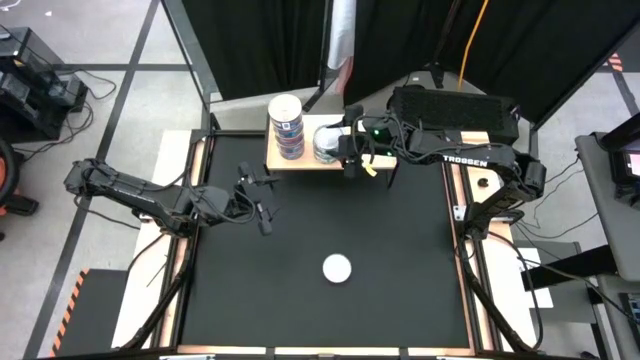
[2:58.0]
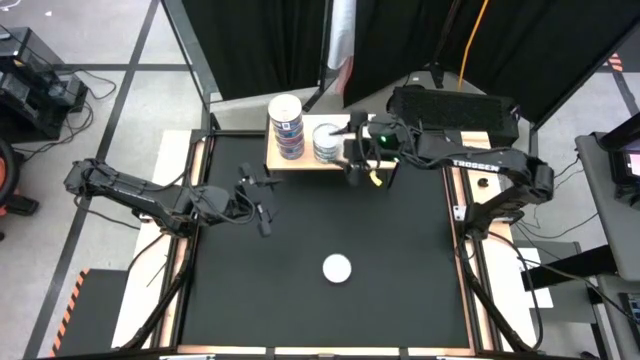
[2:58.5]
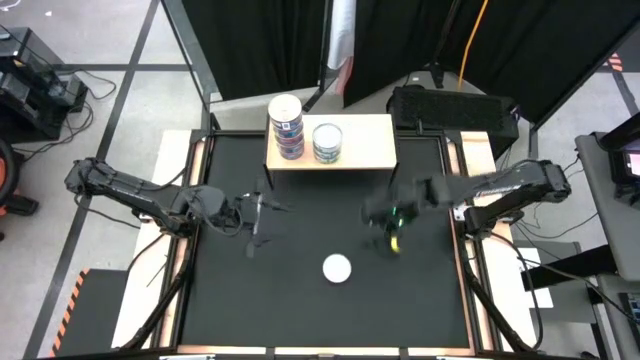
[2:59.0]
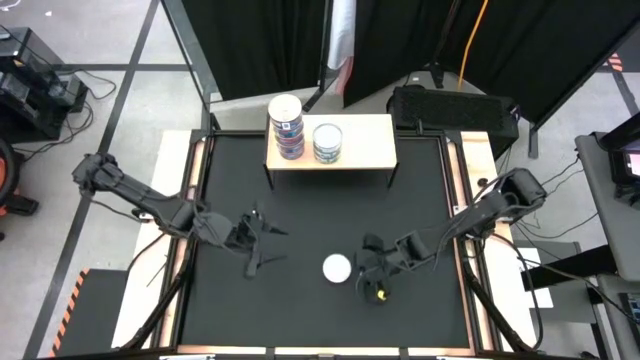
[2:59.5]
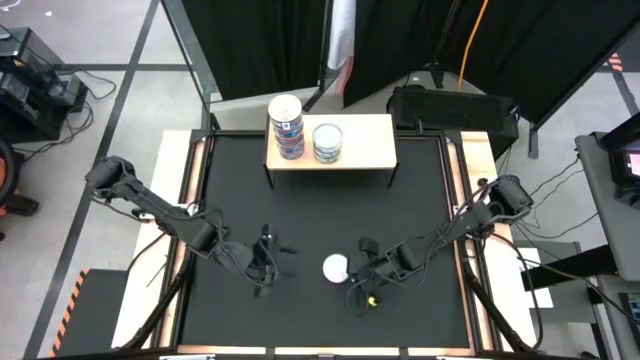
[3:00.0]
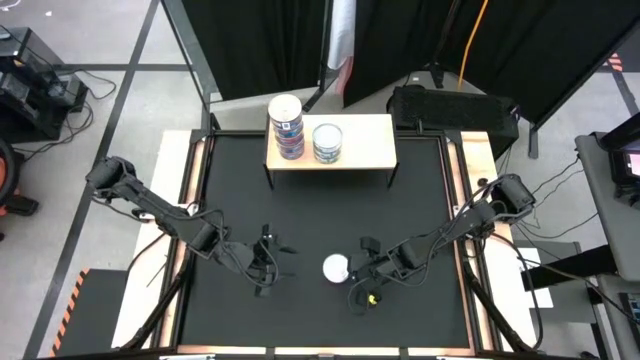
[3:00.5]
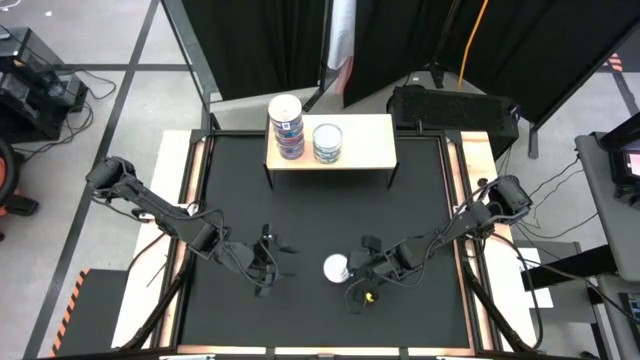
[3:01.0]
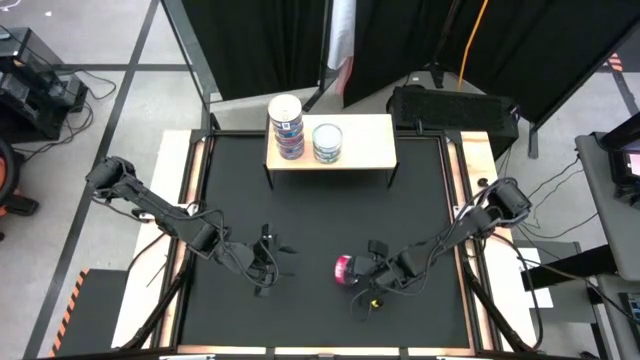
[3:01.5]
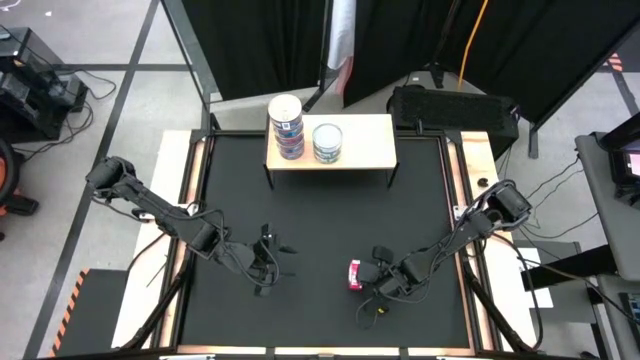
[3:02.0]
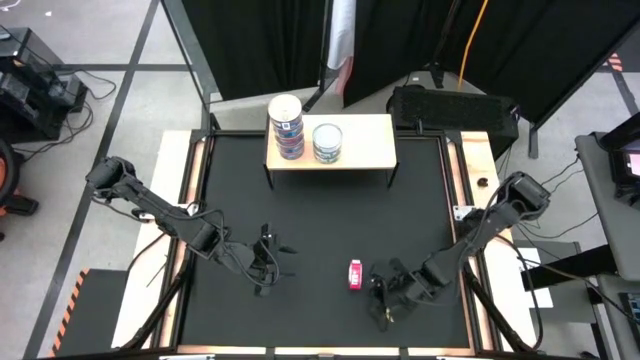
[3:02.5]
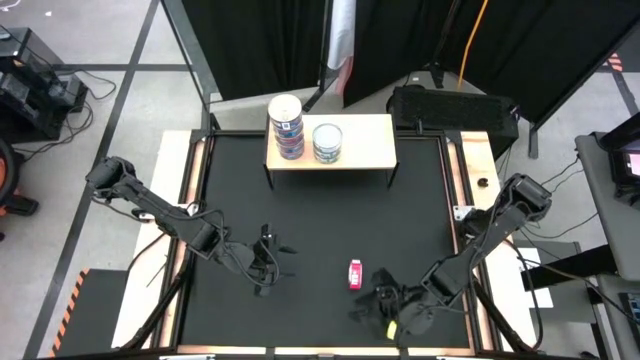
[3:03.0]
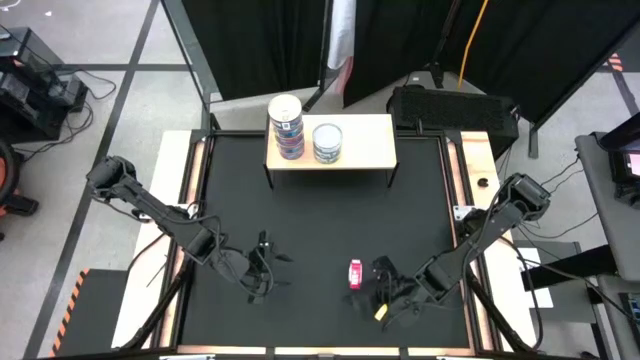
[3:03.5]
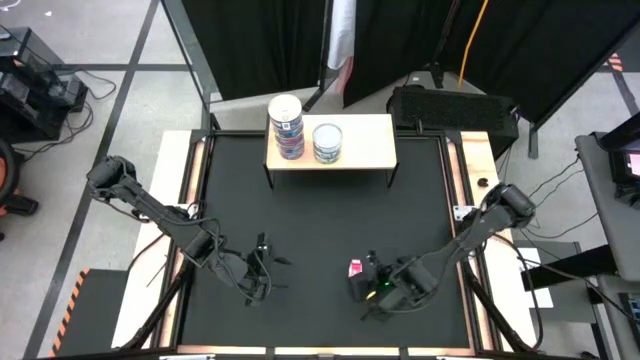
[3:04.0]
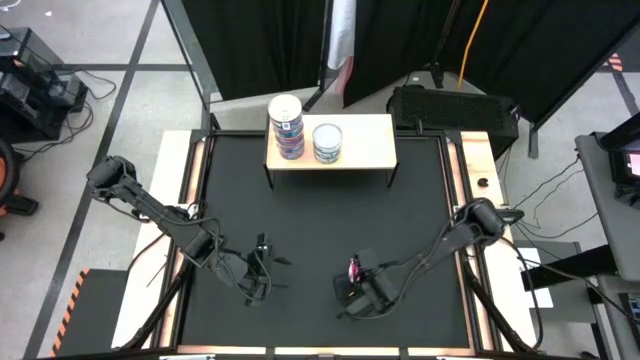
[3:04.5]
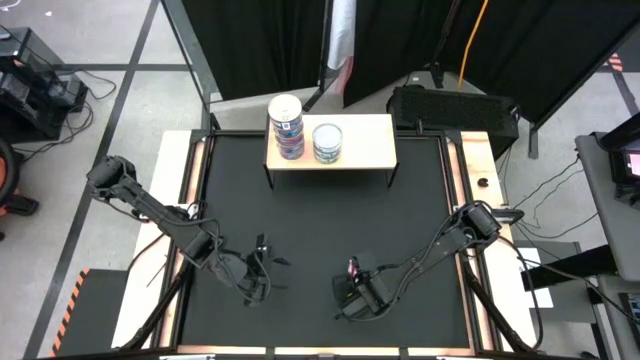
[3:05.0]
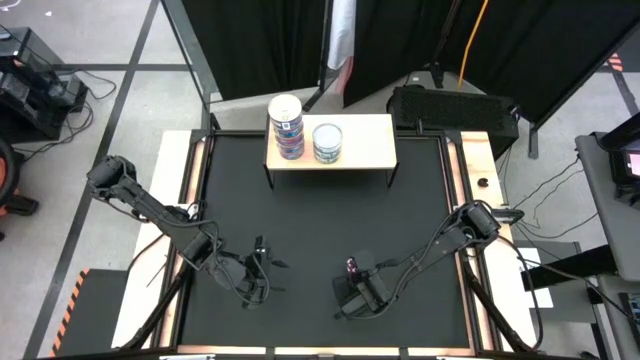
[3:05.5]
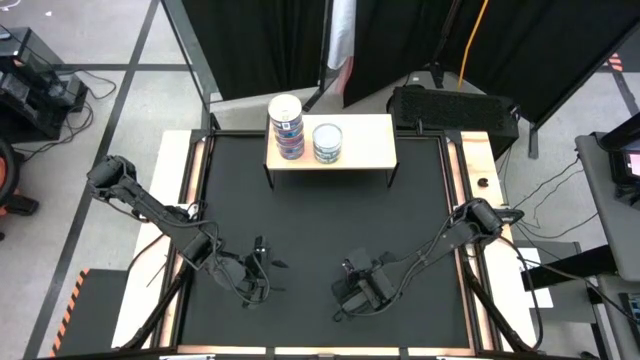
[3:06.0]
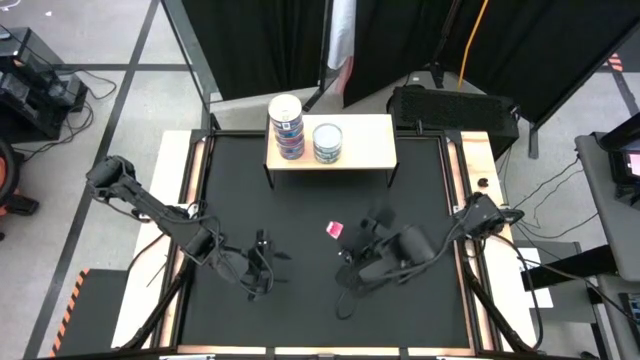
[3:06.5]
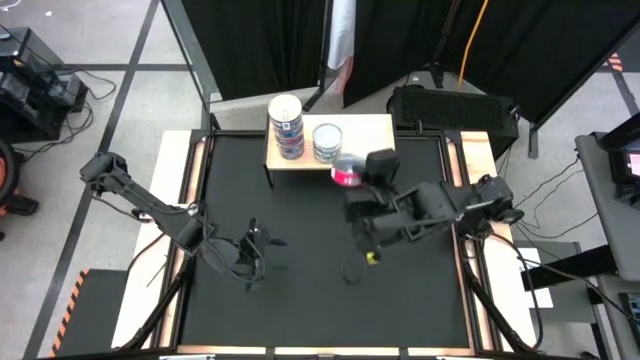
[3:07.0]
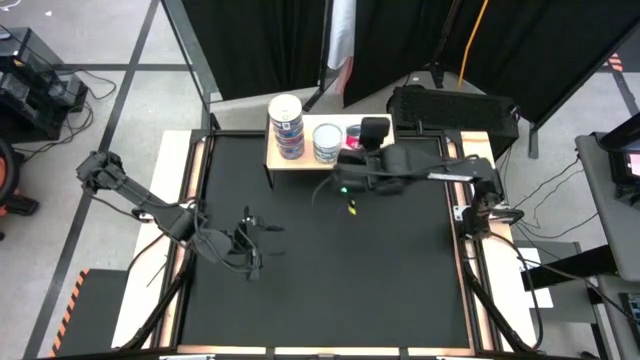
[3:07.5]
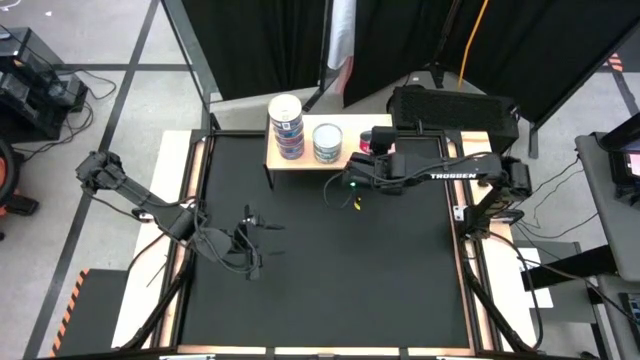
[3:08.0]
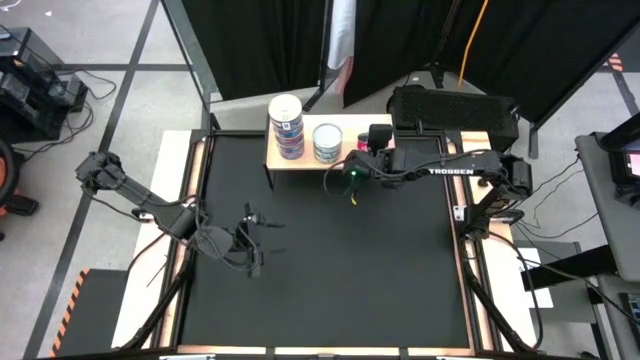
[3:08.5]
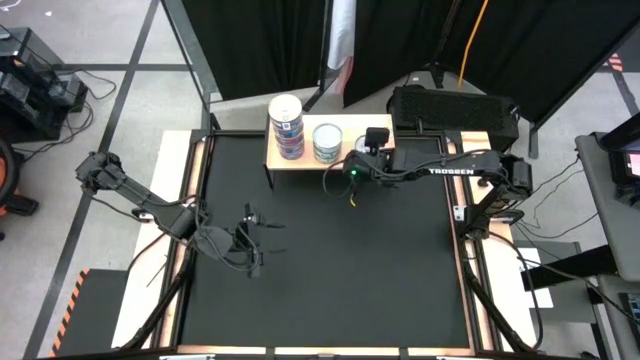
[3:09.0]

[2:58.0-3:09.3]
Task: Stack canned seafood by type on shelf
Put the red tuna can on the shelf

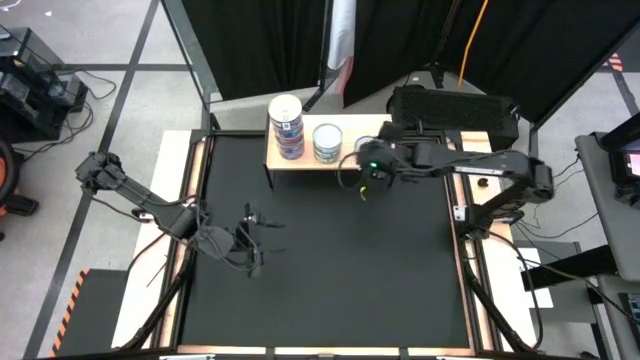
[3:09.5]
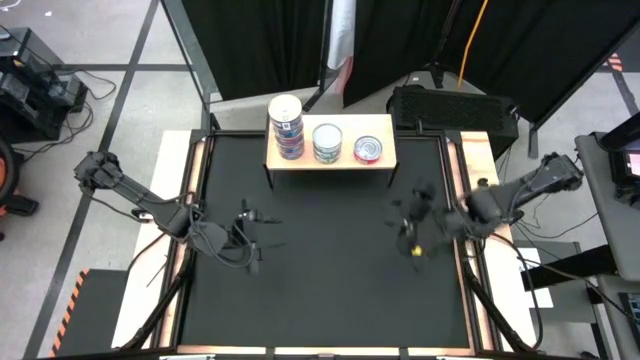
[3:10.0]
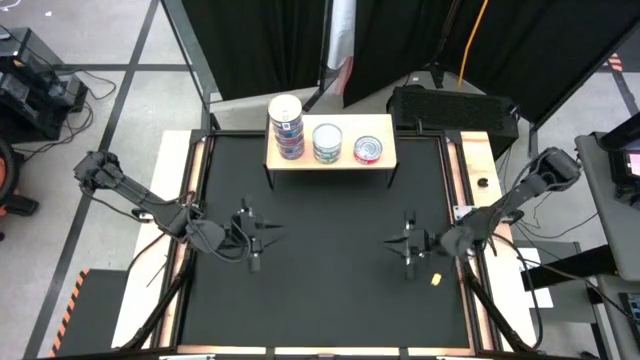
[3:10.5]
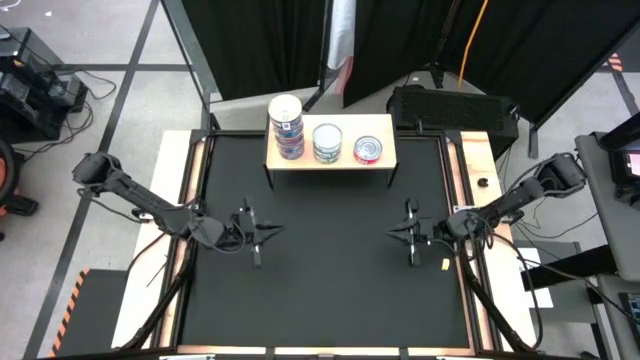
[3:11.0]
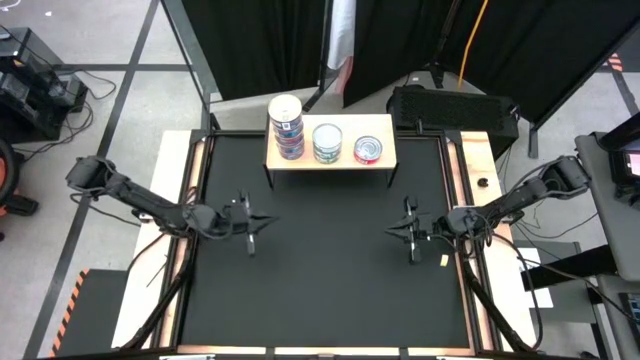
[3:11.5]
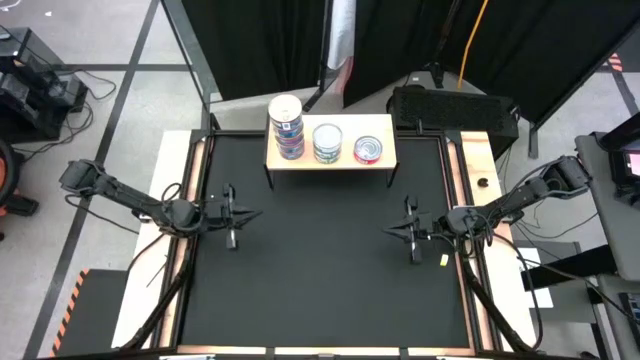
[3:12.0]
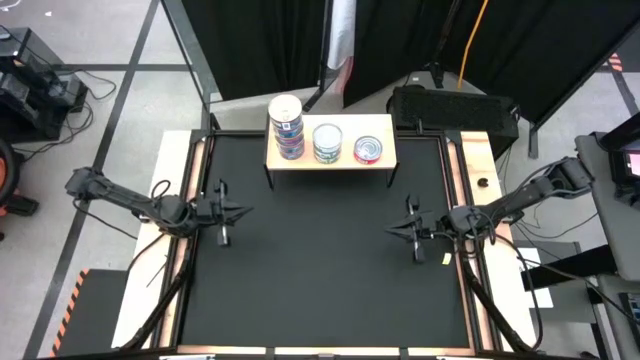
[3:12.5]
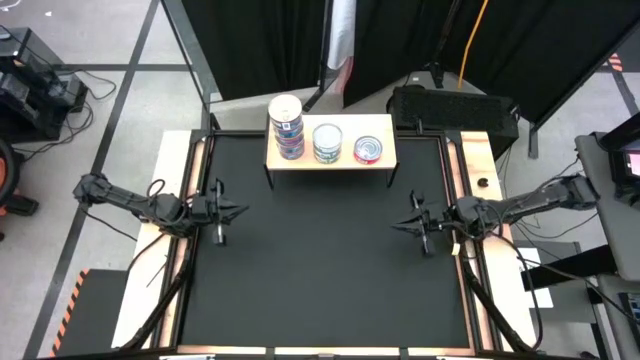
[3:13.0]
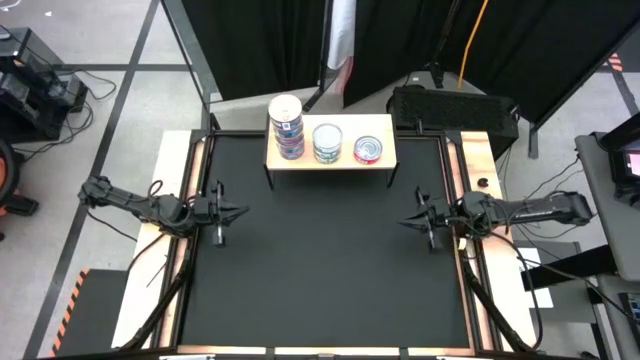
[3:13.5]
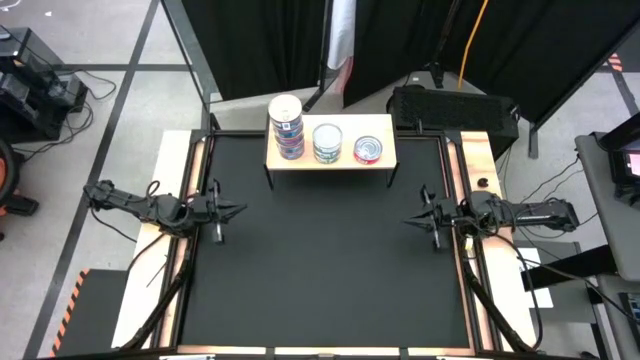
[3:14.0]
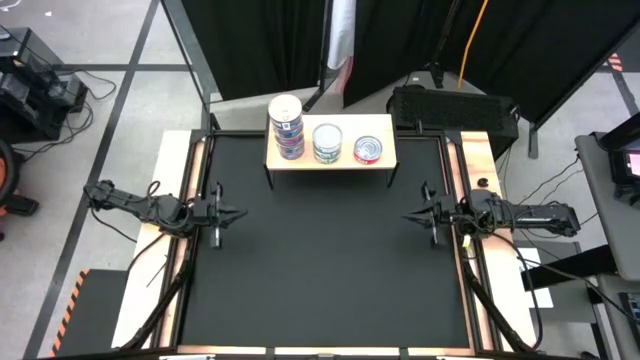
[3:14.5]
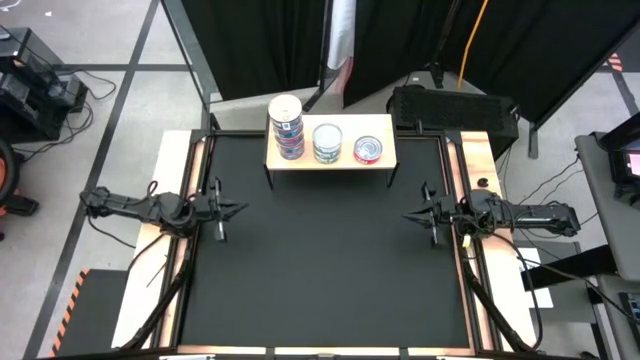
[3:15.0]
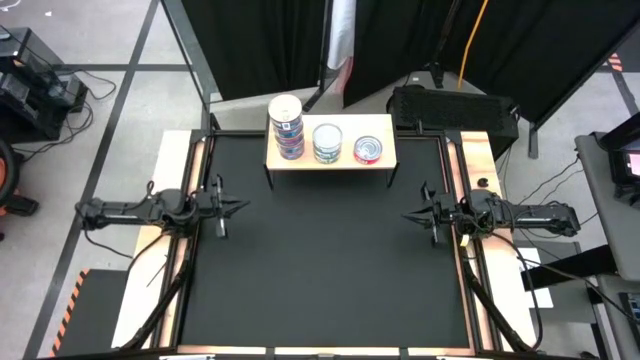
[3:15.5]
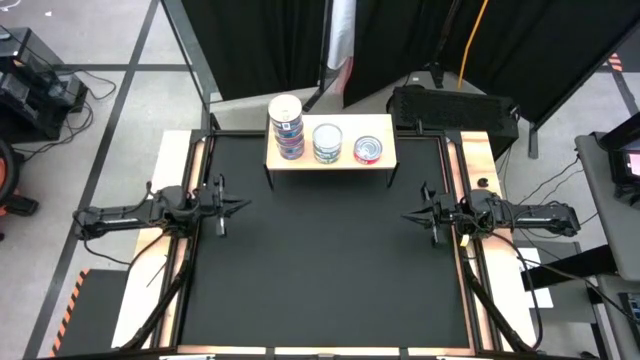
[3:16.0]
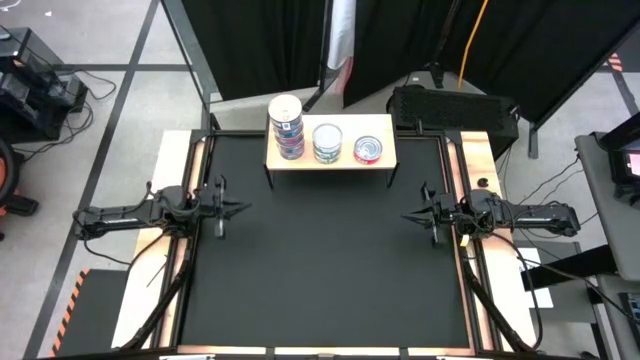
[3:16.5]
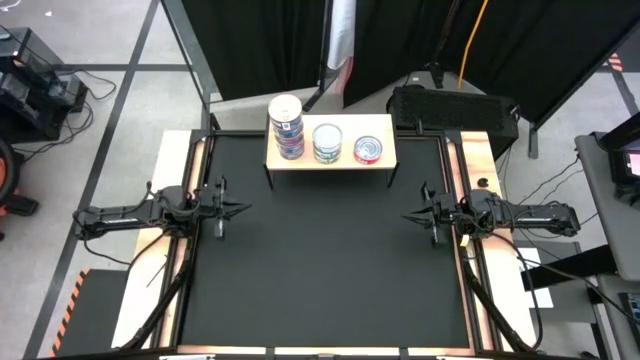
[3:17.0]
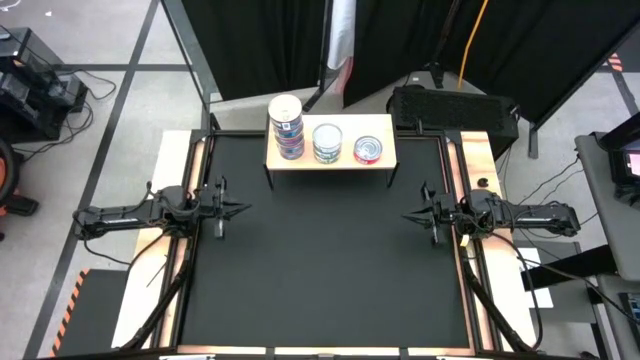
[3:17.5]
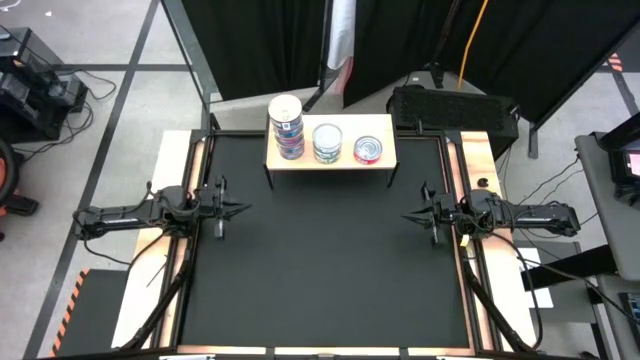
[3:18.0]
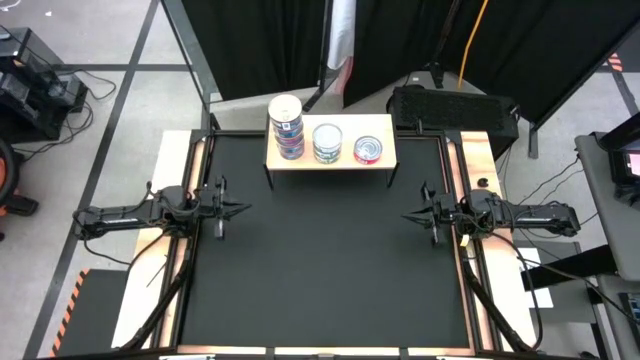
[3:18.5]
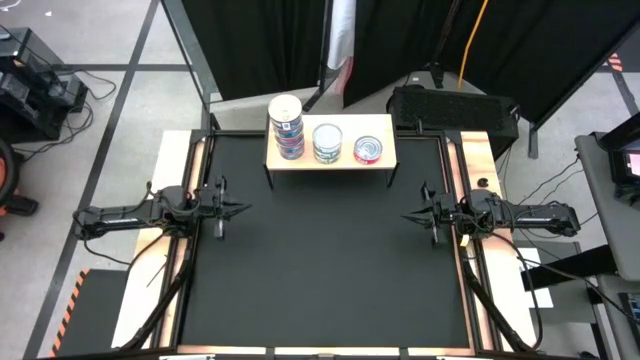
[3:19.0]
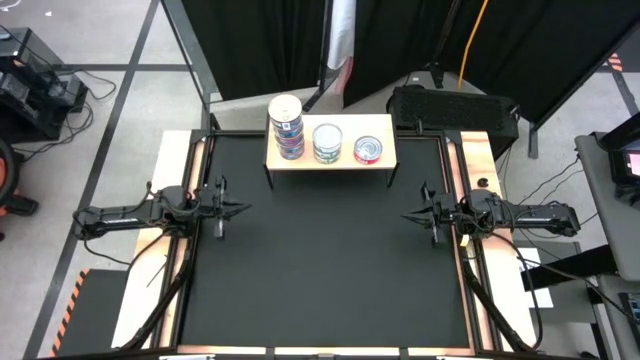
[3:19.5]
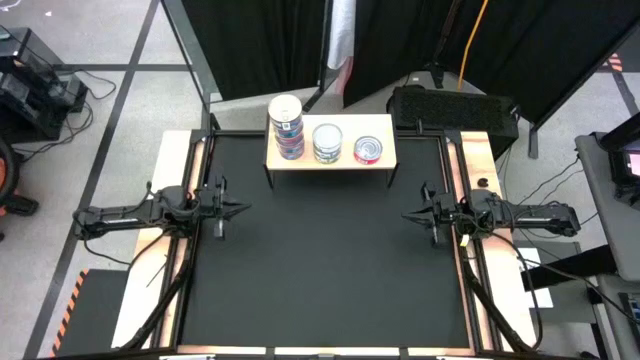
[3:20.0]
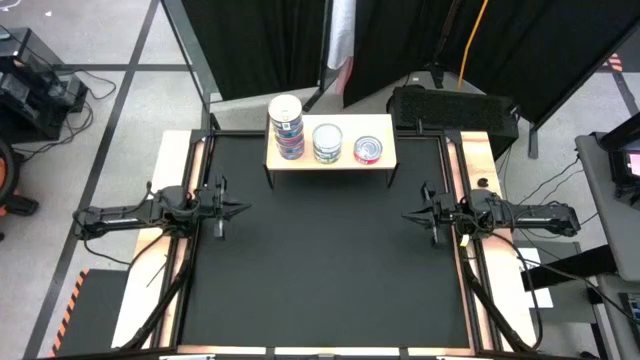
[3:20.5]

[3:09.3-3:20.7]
Return to Home Position
